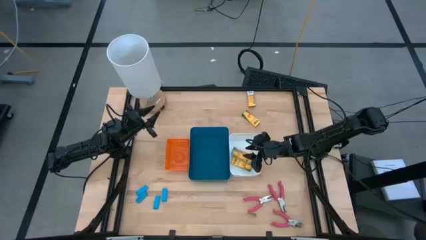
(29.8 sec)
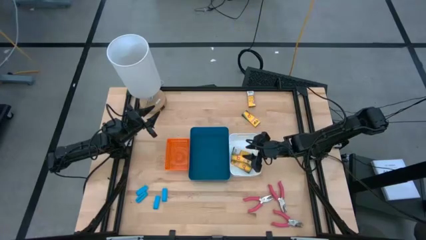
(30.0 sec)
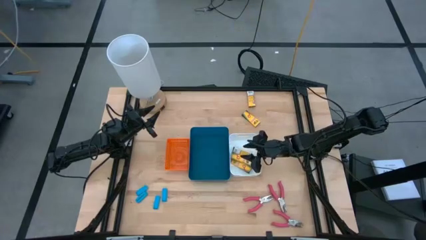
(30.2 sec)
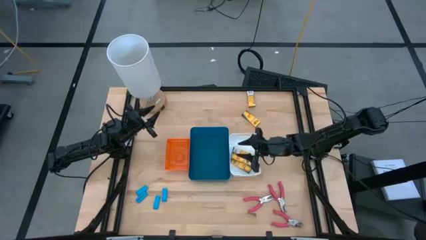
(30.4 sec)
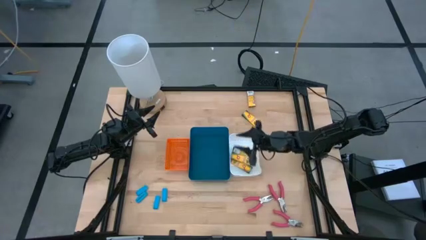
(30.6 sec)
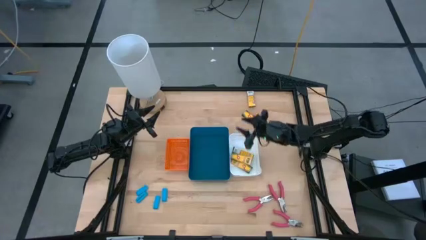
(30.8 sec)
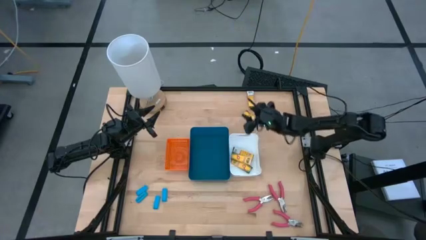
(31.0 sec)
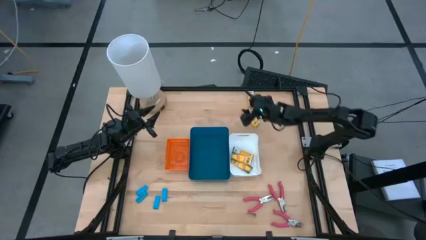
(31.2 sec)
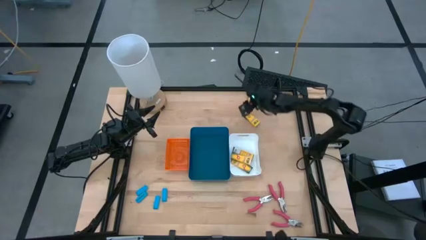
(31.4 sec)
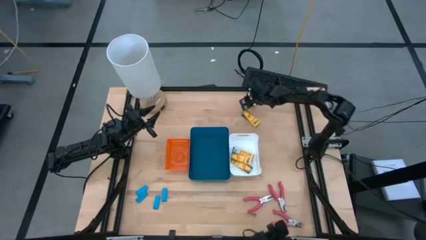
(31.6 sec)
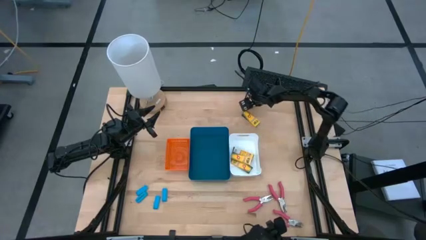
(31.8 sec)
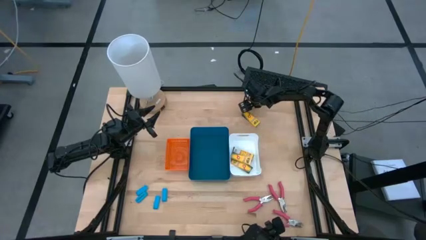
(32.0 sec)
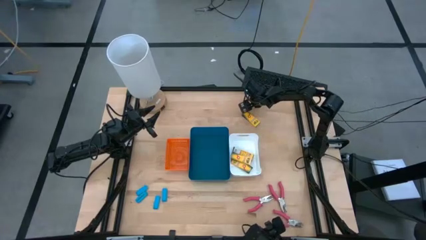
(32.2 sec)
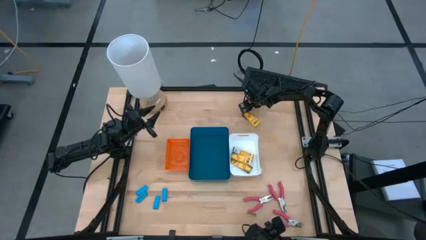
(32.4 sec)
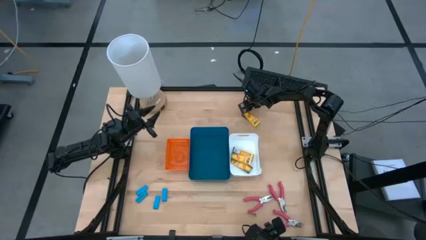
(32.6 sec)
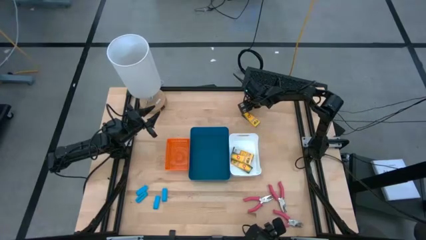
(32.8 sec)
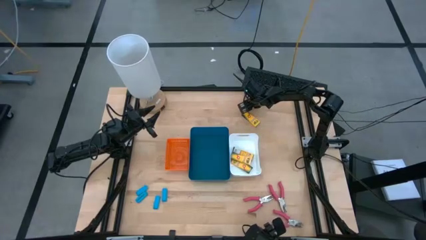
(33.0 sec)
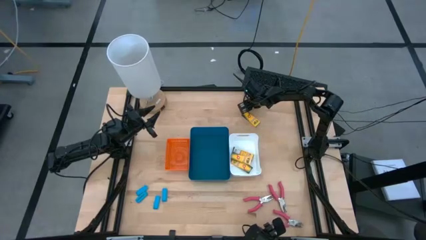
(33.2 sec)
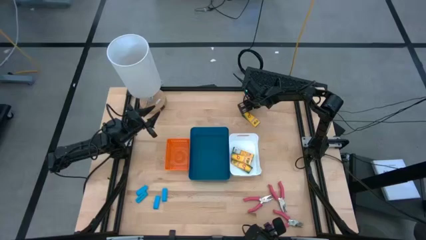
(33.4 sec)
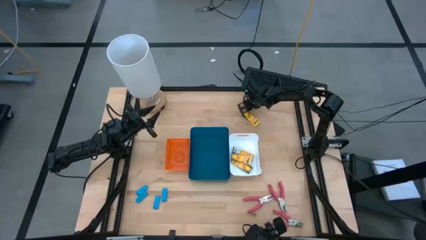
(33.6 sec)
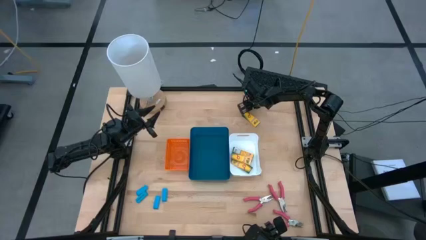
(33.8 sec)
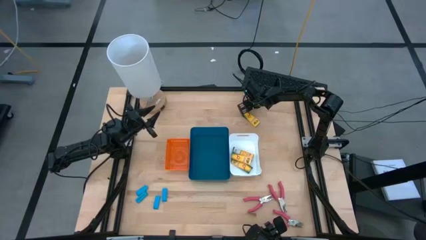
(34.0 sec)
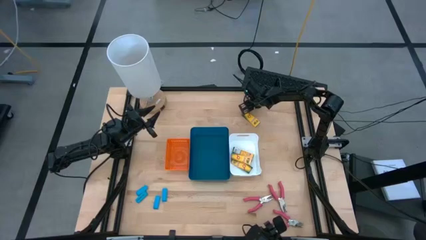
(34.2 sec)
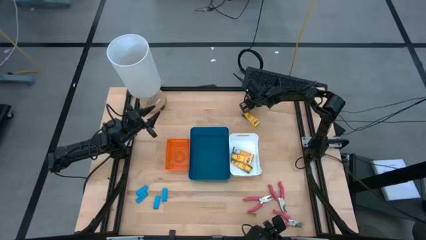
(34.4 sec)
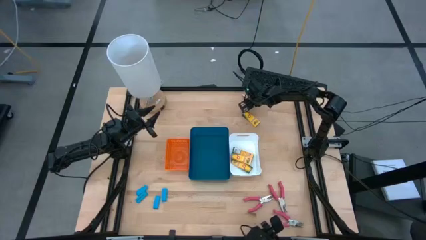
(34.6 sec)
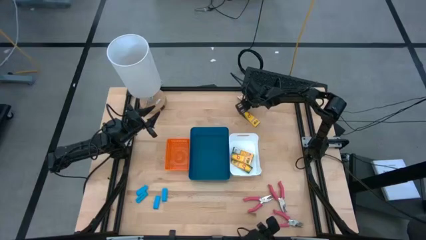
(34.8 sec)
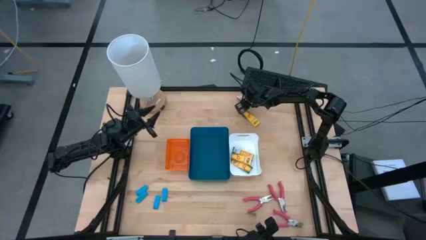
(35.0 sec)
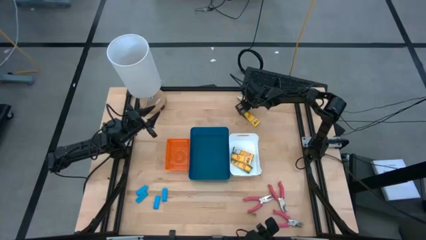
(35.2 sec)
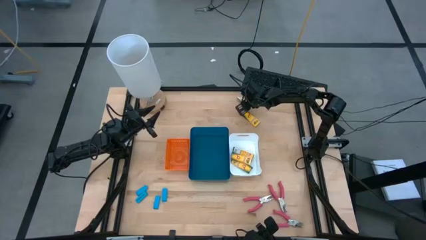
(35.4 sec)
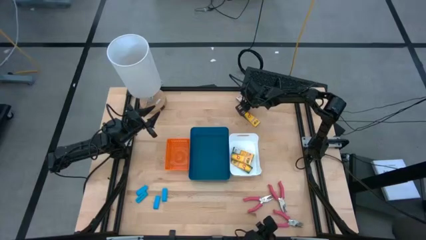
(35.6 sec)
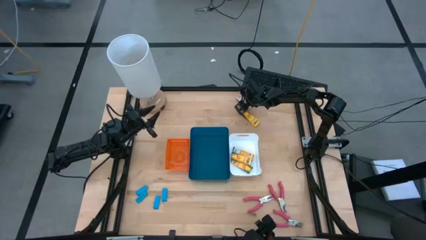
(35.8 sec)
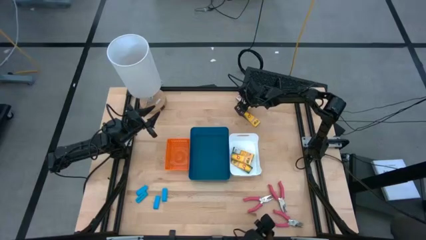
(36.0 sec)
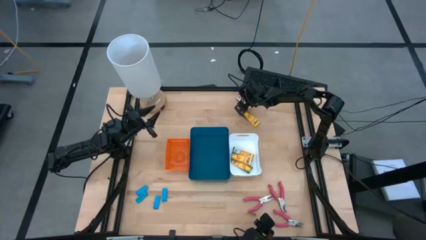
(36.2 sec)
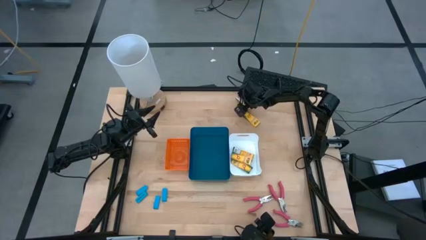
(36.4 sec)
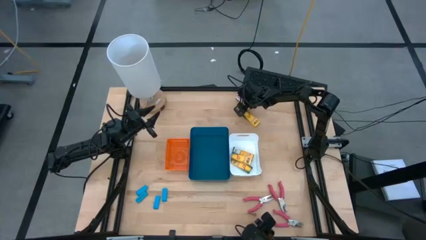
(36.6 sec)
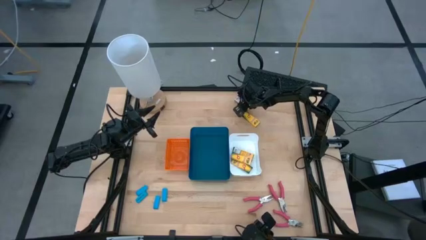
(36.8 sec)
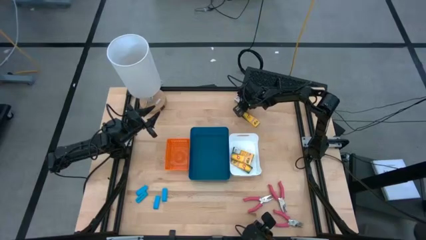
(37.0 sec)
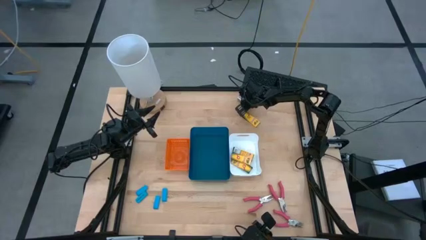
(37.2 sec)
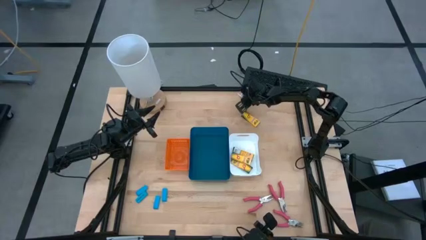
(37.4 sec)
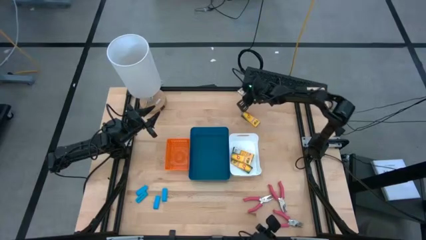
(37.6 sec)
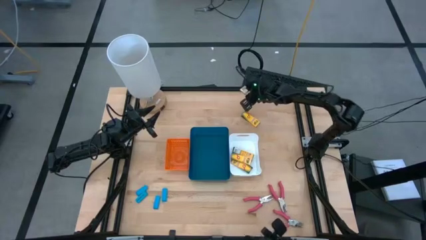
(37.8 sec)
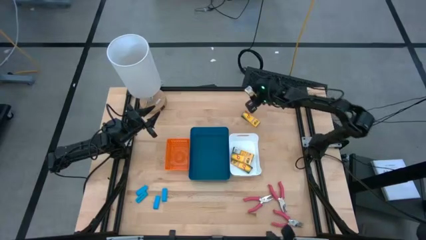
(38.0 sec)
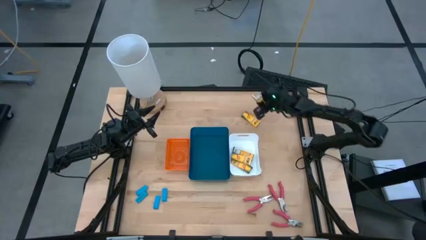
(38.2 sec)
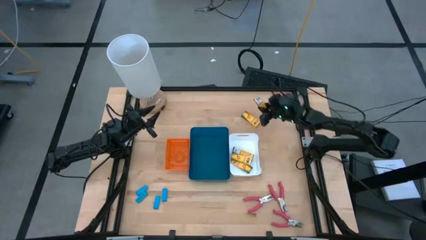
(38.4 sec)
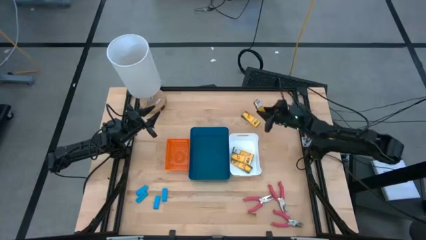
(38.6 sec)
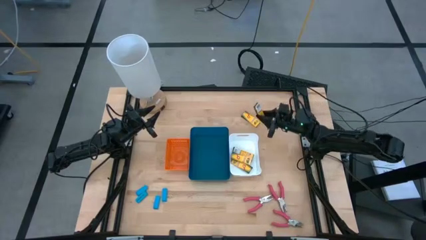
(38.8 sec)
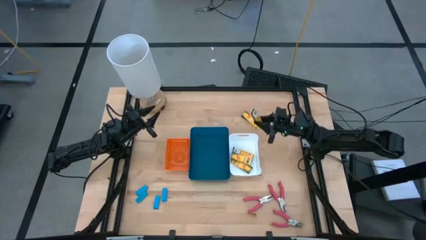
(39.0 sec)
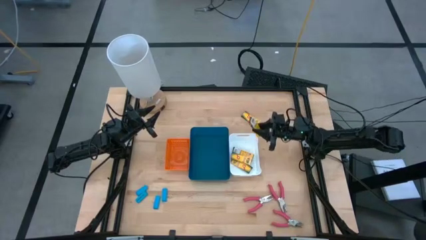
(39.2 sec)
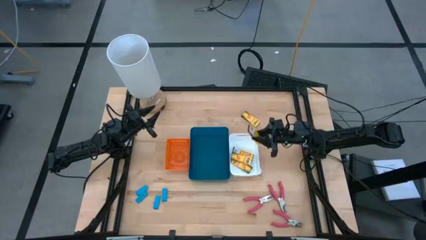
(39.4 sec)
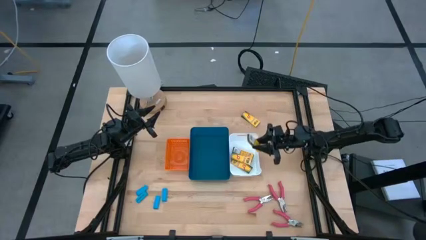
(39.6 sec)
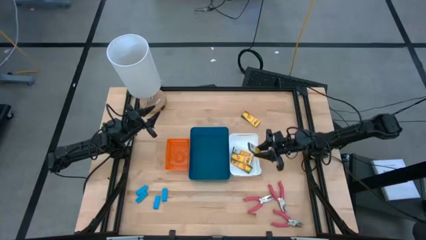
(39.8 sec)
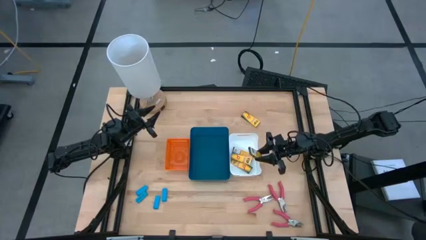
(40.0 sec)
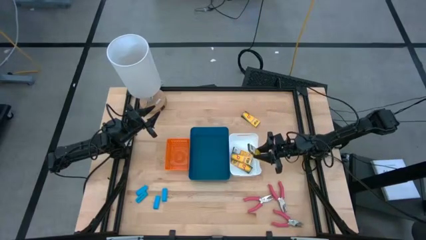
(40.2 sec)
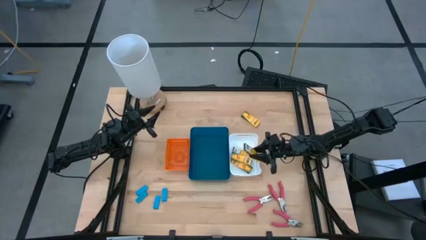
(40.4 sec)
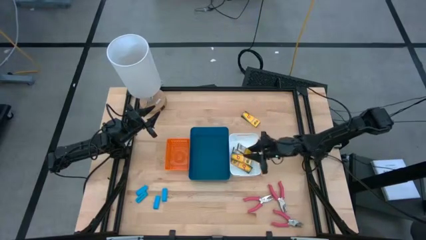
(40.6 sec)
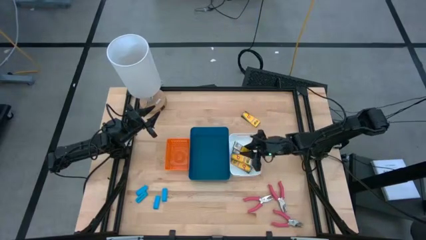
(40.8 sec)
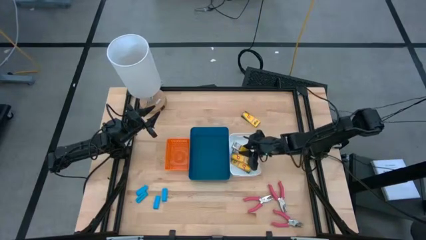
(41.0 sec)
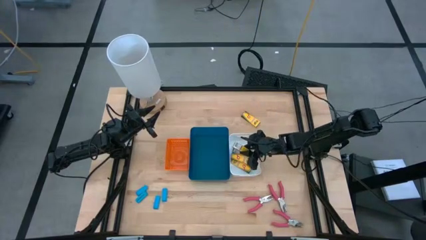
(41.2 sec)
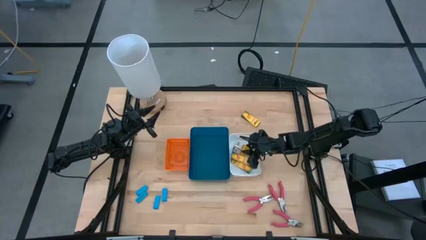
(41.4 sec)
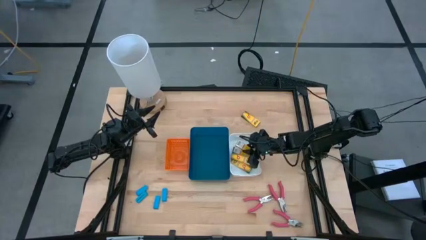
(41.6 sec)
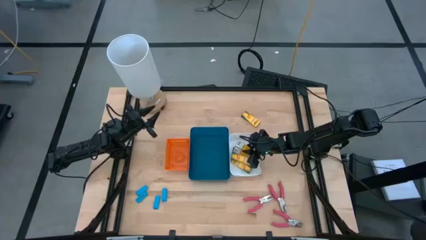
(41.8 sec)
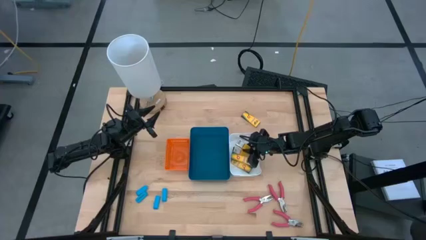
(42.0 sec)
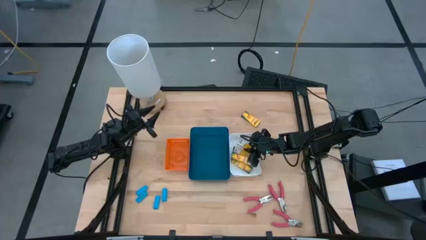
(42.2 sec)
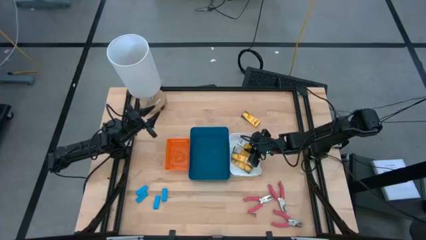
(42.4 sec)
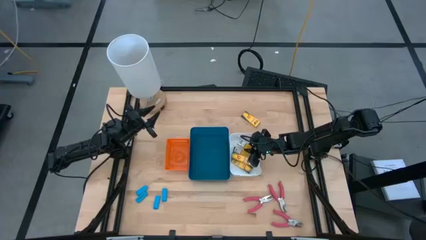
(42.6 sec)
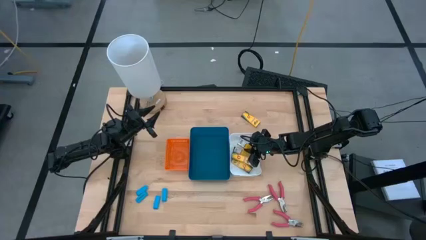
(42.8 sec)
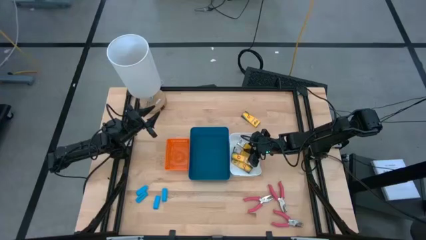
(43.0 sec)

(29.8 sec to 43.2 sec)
Task: Pick & Place School Supplies
Put the yellow crayon box into the white bin

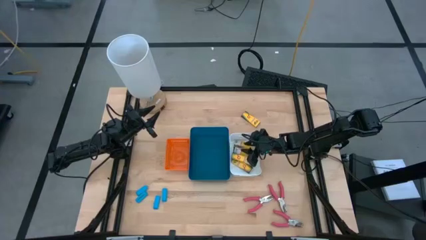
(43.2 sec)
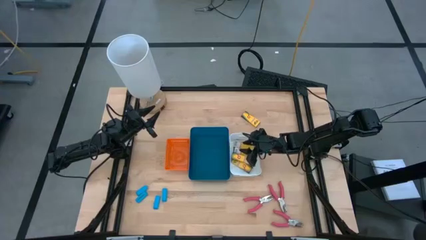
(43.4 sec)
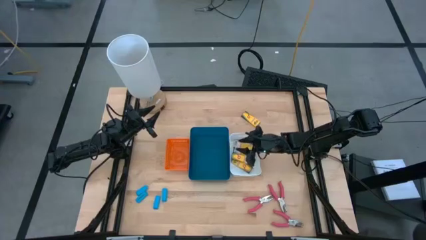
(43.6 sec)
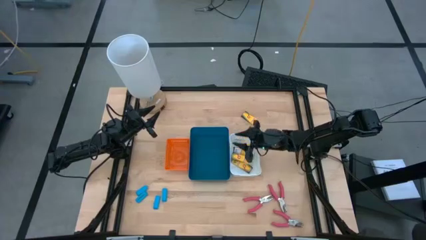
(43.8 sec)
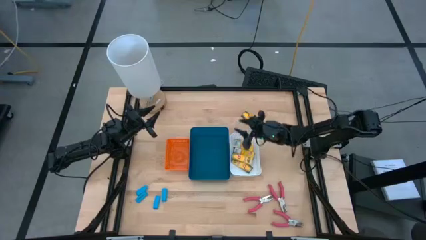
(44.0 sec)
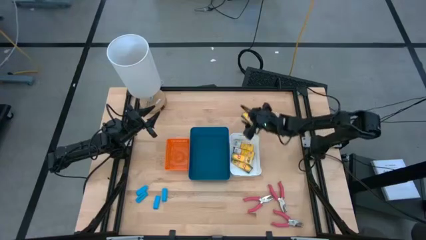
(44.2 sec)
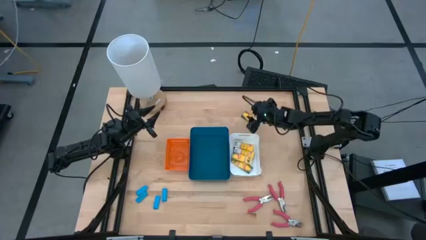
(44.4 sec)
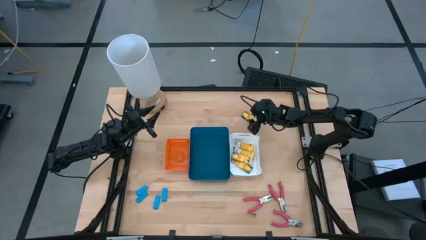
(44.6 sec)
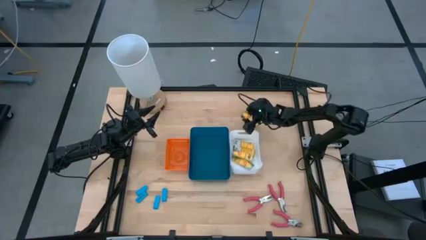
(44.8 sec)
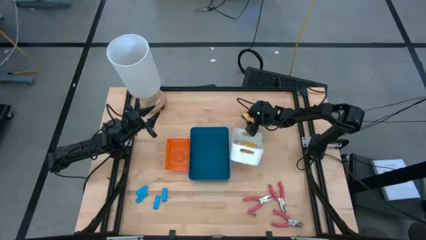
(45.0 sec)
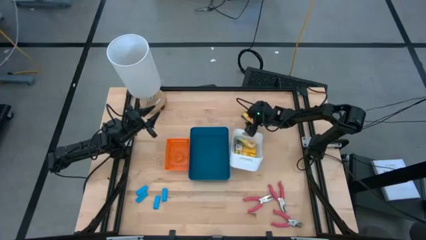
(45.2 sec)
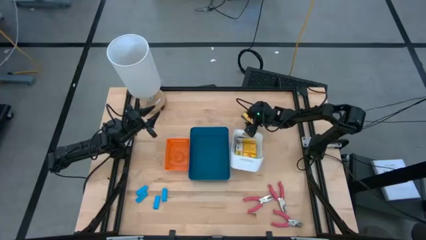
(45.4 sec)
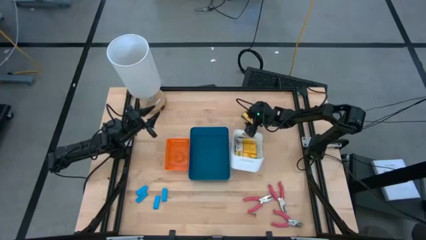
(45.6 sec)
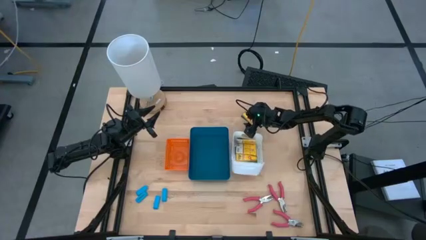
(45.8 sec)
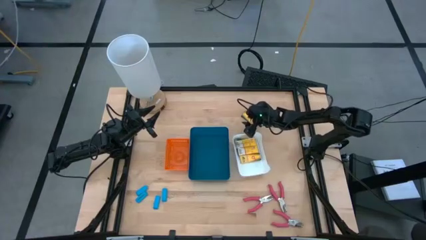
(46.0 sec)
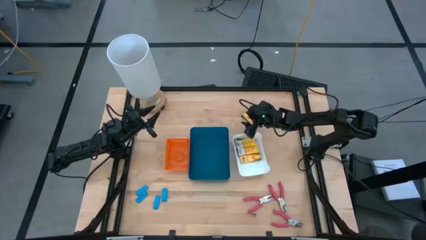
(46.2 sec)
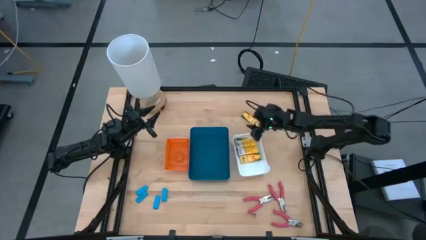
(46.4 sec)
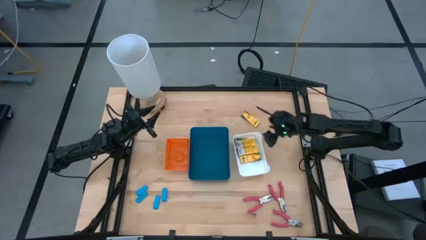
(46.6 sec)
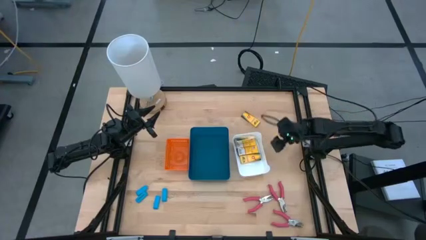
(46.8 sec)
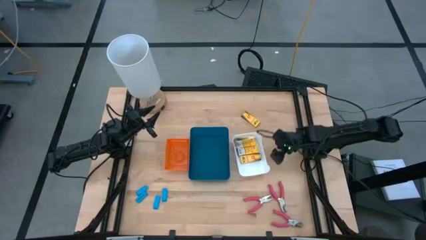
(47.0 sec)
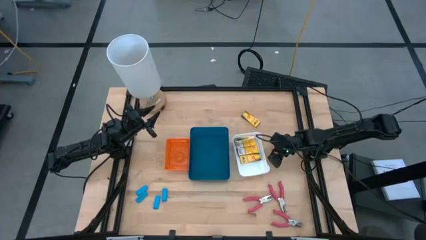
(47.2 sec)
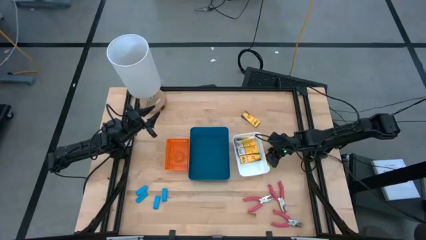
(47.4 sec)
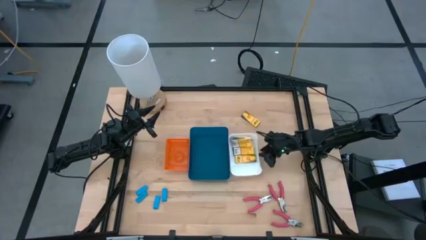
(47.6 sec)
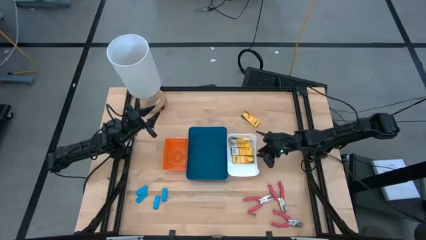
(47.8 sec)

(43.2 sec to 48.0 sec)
Adjust the white bin
